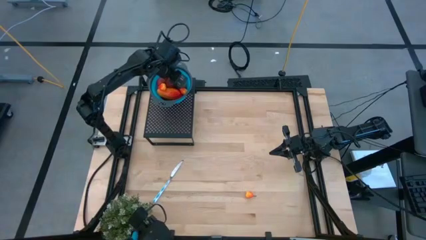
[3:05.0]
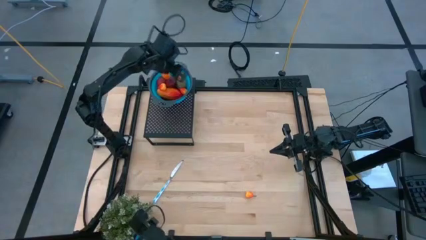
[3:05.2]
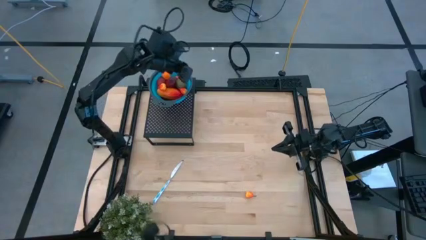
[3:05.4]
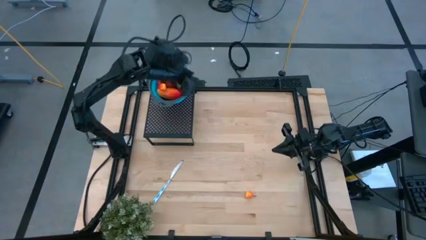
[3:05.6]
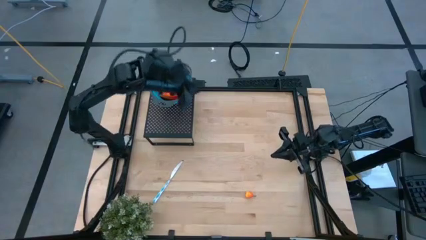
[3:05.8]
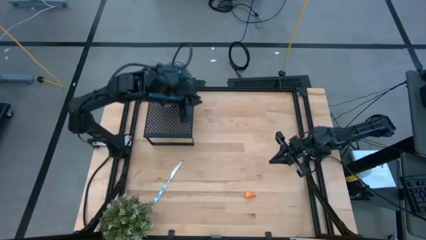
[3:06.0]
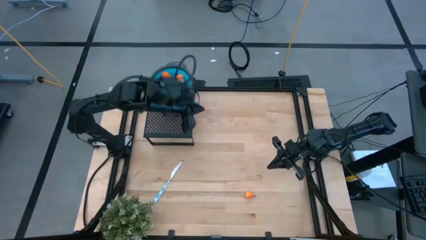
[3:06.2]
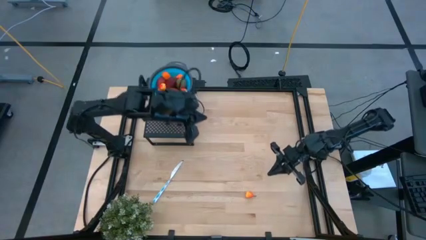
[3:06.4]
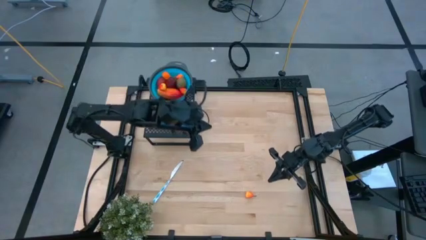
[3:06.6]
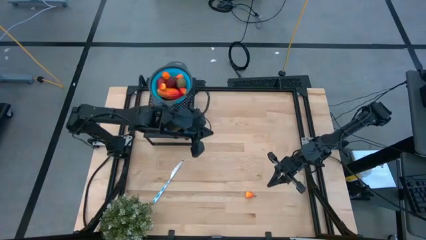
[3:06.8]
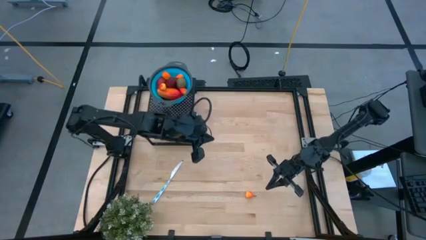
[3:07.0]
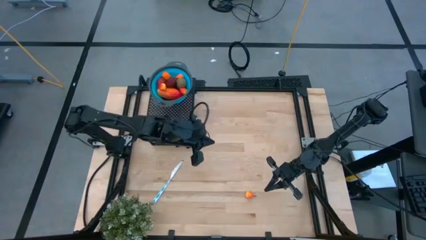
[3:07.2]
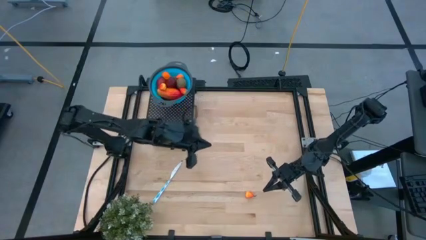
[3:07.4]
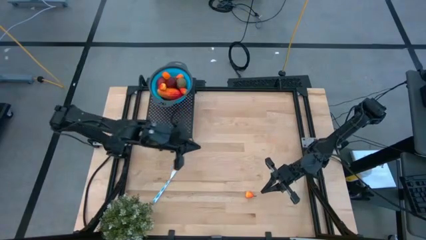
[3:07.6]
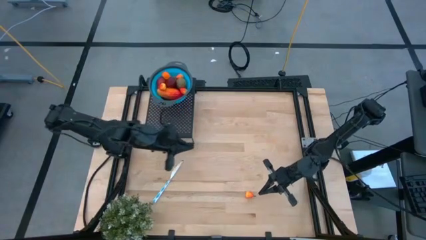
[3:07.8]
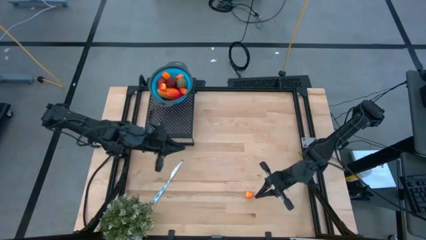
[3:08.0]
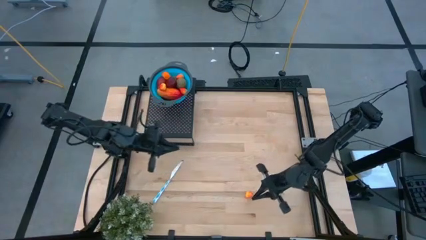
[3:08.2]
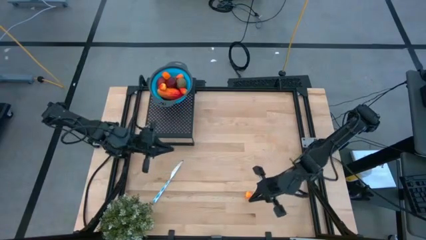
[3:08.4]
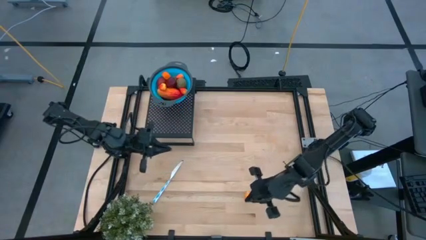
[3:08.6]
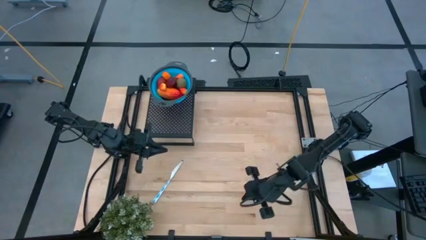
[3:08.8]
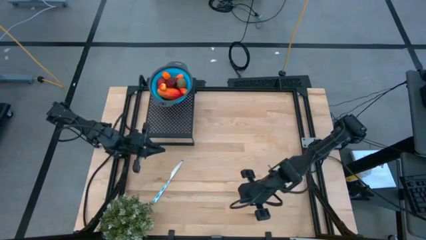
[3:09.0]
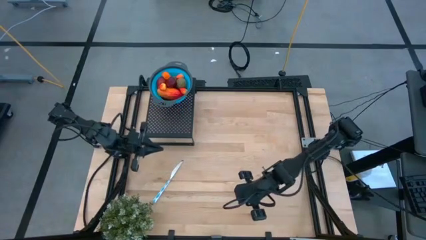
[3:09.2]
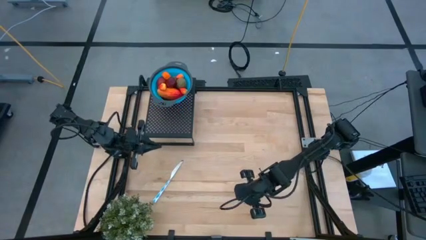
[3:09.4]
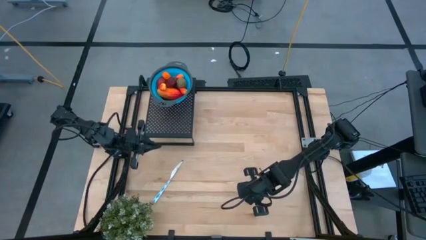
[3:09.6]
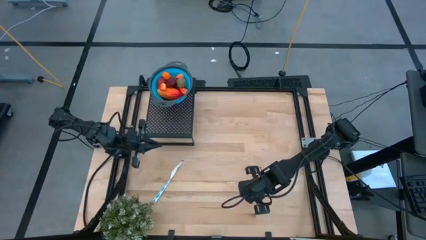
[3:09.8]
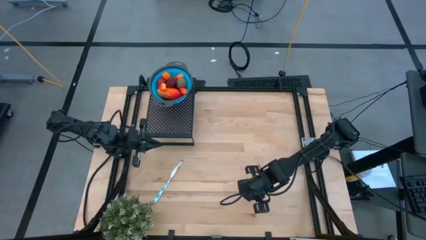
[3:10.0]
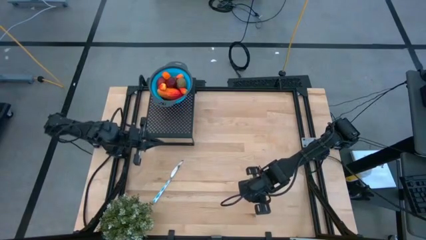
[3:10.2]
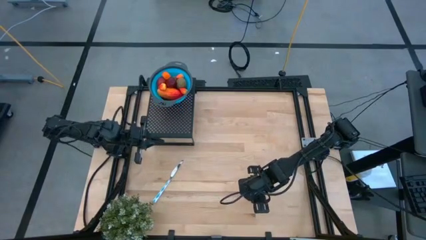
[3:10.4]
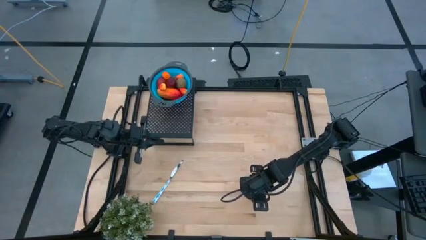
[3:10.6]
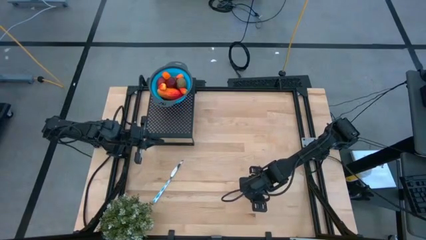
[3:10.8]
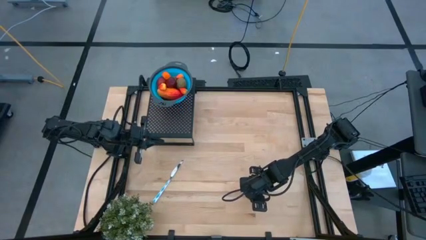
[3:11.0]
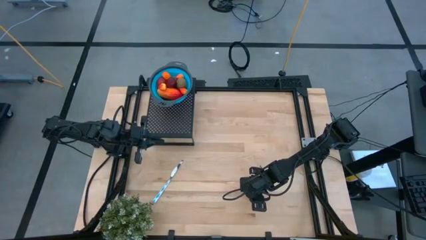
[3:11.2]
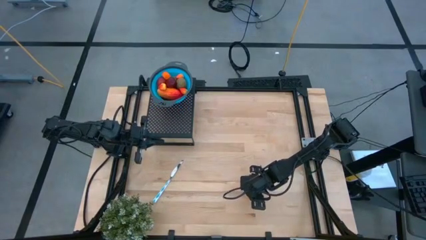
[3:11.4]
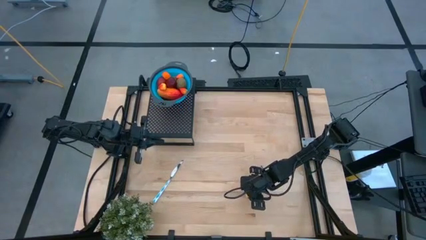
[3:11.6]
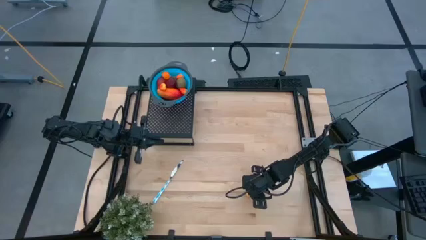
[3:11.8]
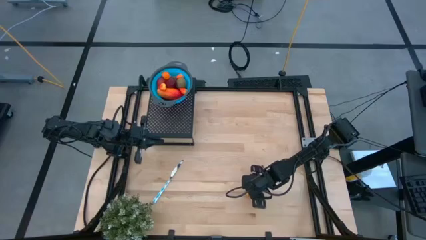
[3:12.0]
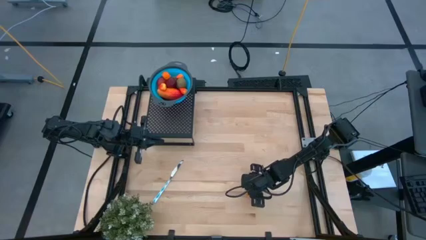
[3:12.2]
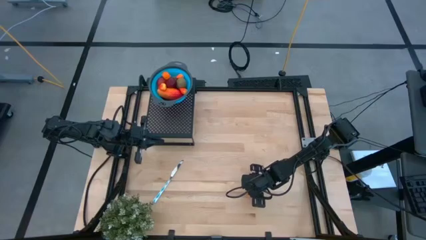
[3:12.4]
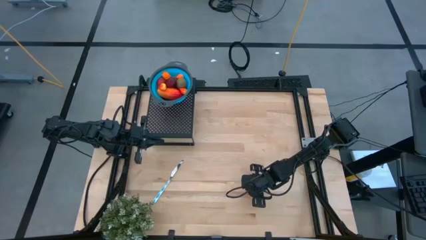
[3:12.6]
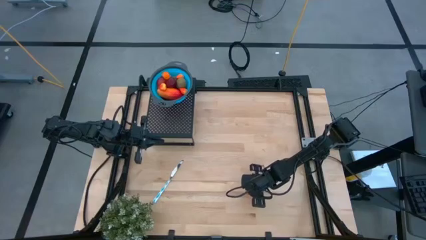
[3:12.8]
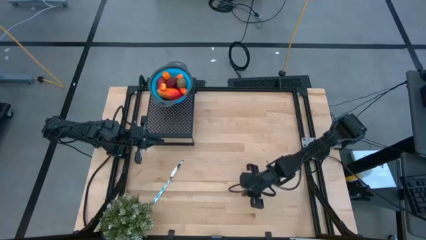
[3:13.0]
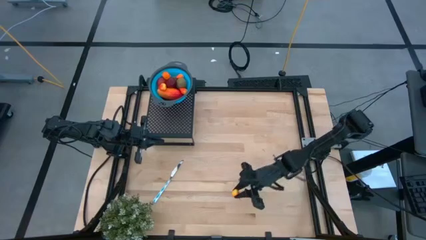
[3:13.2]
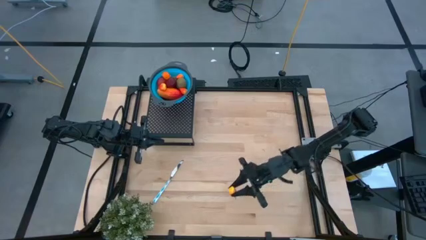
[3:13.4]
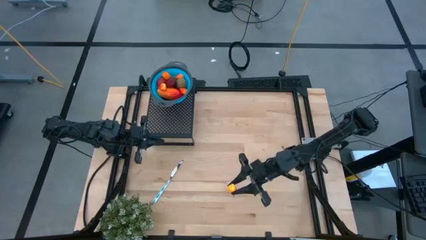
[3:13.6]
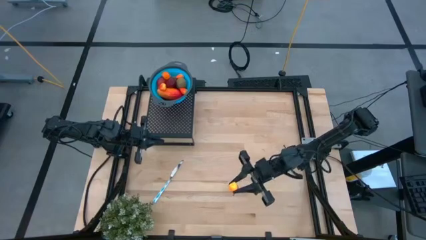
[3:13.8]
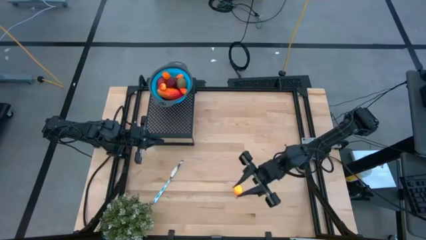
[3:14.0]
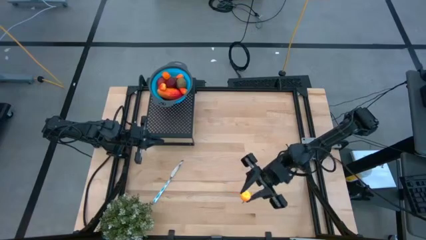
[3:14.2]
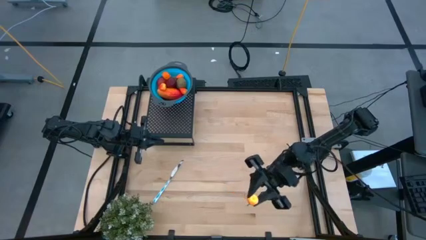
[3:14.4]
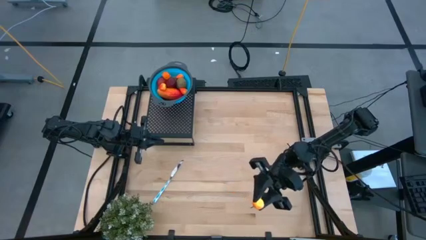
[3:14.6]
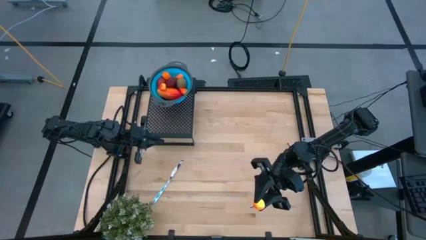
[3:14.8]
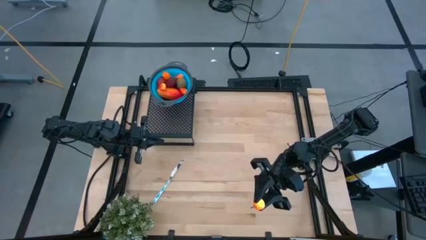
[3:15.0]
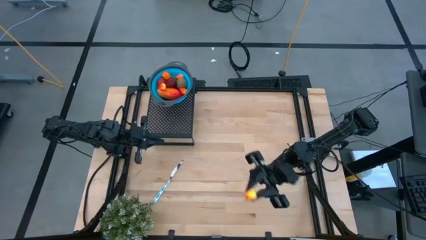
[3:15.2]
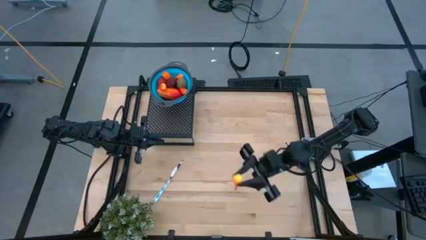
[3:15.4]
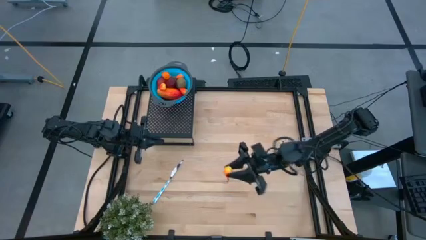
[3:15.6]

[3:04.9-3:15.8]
Task: Pick & Place Fruit
Put the orange pear into the blue strainer bowl on the shelf

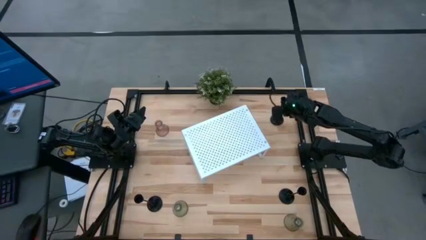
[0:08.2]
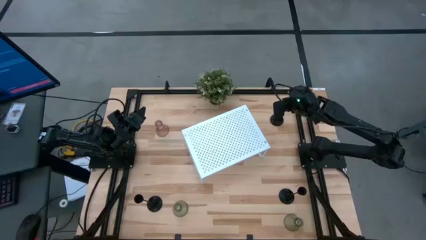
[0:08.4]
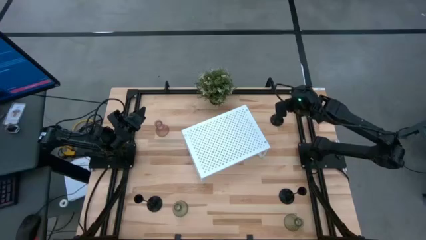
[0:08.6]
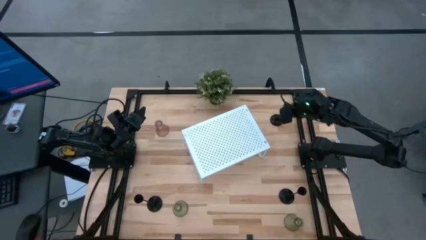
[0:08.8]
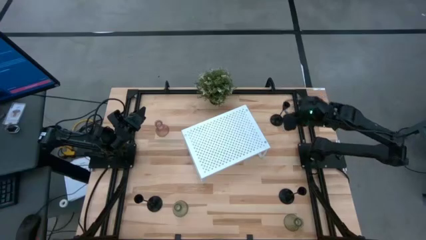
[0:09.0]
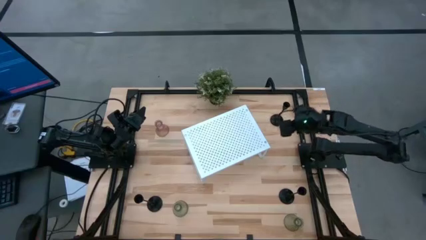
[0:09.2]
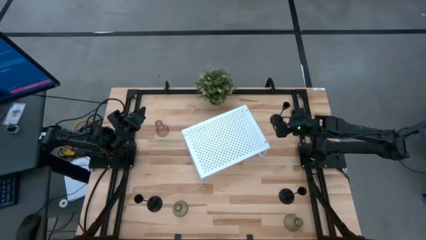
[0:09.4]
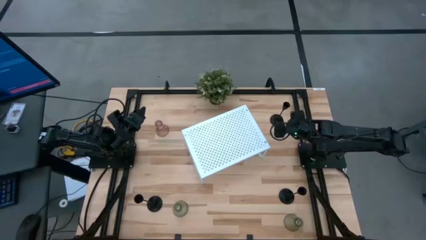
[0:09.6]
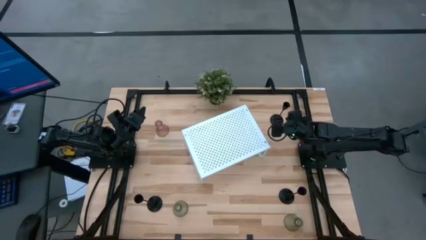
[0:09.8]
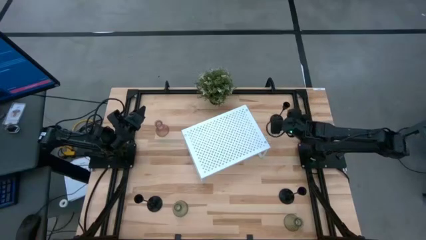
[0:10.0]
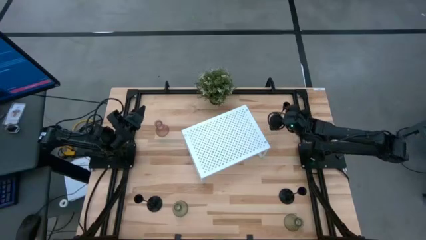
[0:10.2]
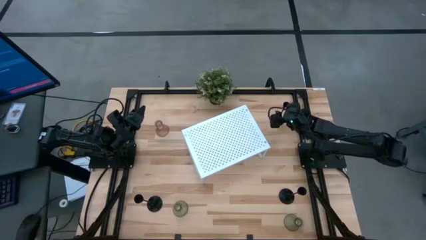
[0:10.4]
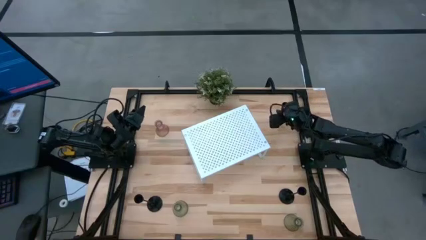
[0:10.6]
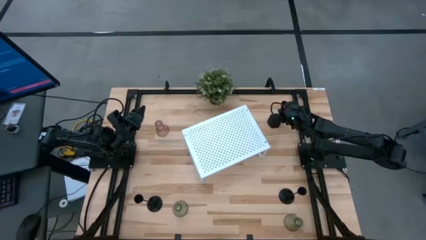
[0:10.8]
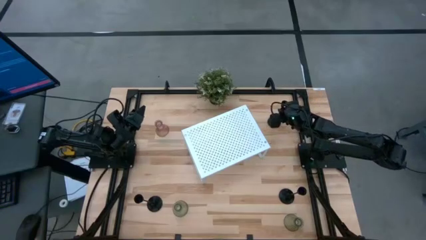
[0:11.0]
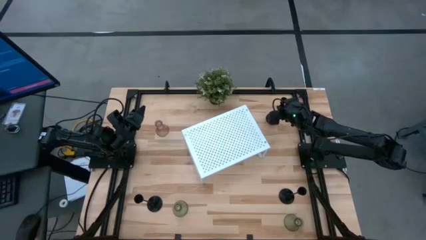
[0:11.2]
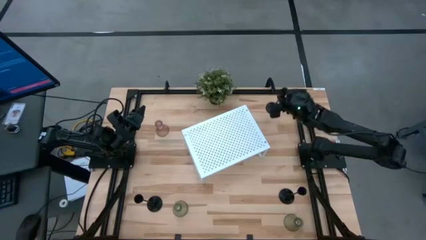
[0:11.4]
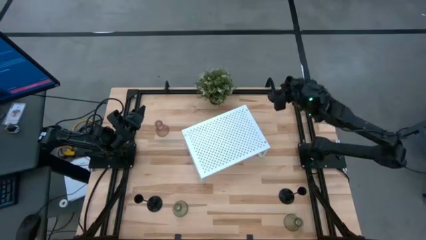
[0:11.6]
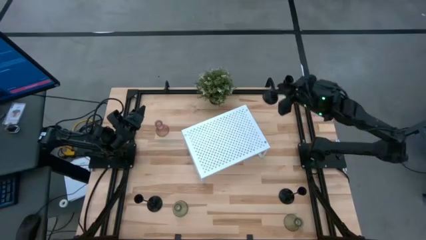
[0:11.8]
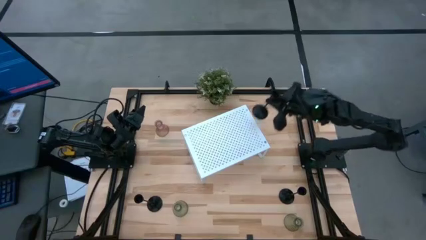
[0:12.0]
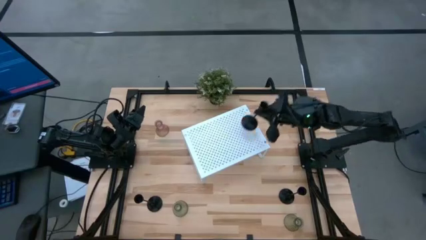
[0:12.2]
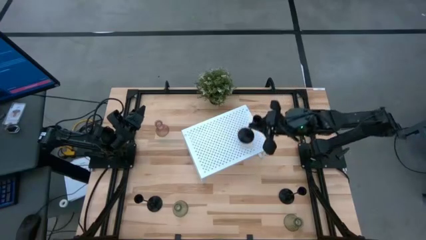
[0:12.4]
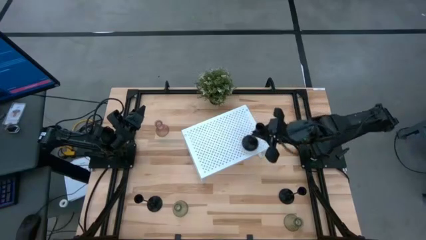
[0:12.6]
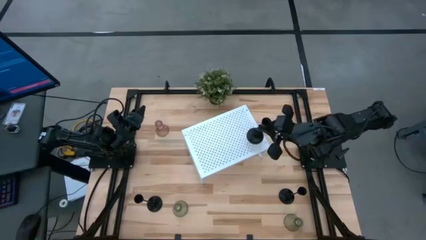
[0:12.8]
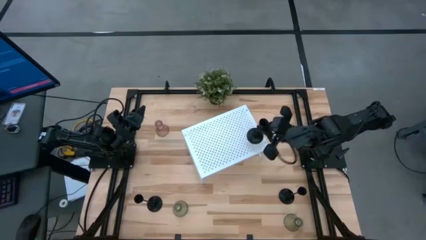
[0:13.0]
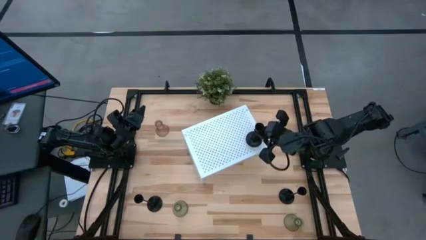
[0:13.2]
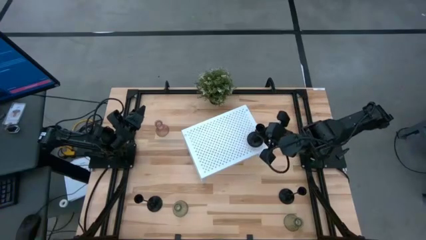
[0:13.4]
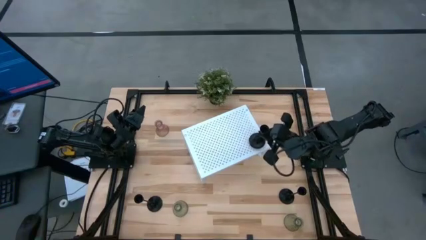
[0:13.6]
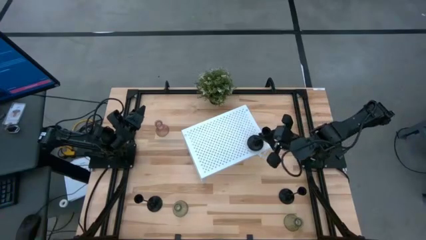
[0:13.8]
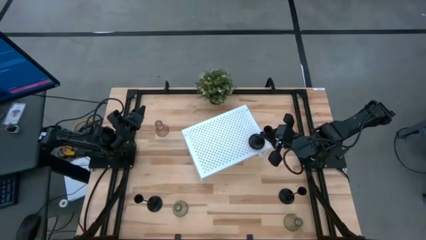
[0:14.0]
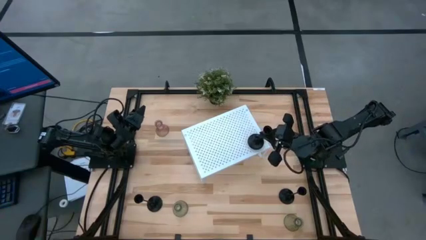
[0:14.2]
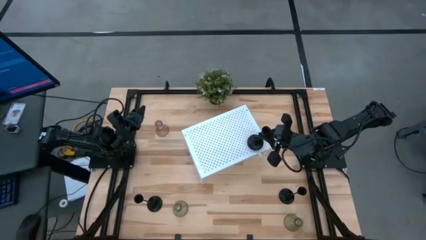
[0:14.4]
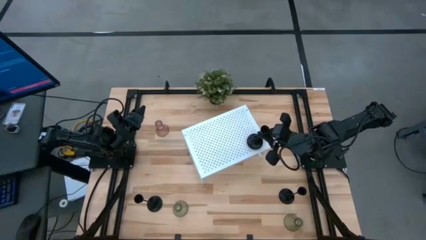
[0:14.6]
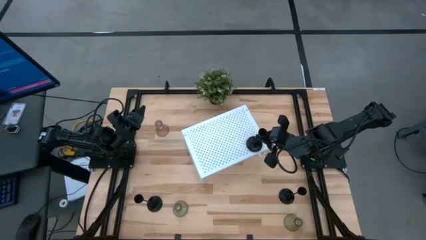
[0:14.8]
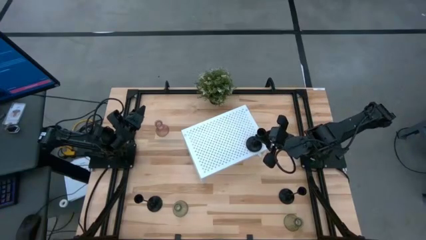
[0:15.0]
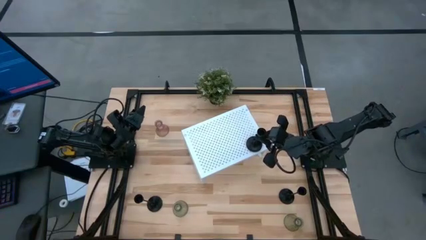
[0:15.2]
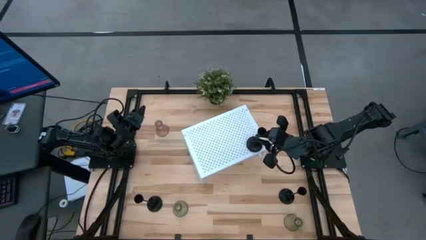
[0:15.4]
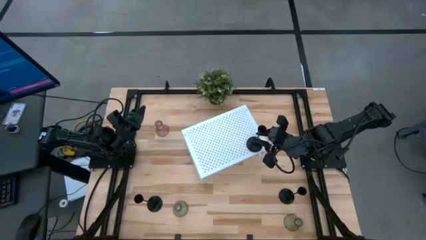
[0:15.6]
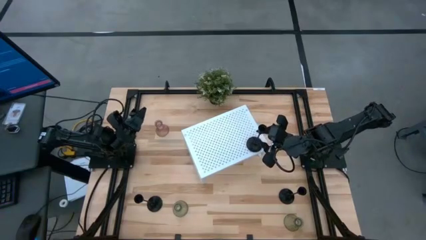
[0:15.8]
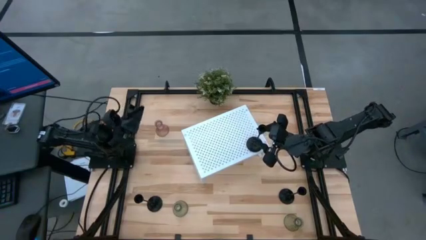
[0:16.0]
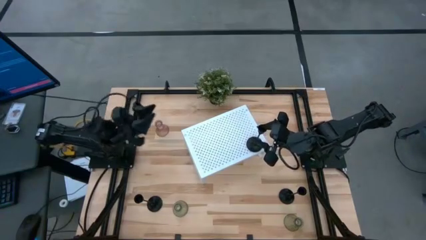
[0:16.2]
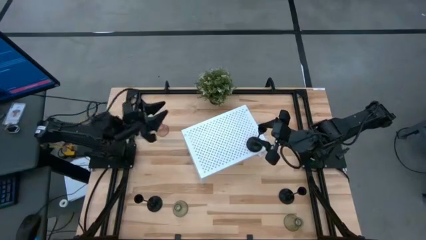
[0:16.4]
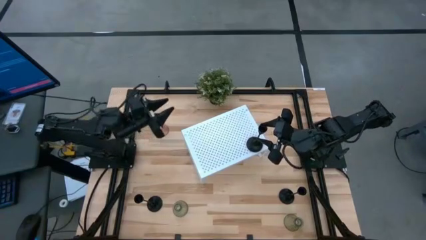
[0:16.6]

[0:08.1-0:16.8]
Task: Pick & Place candle stick holders
Put the top right black candle holder onto the shelf
